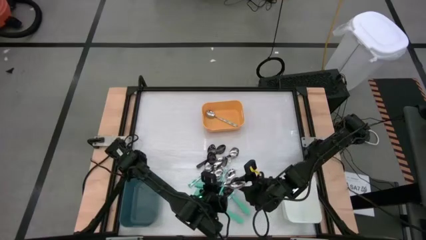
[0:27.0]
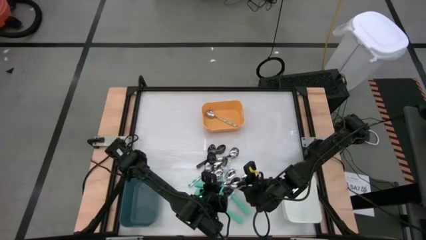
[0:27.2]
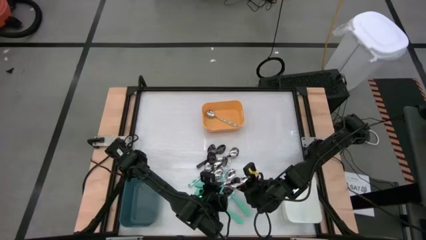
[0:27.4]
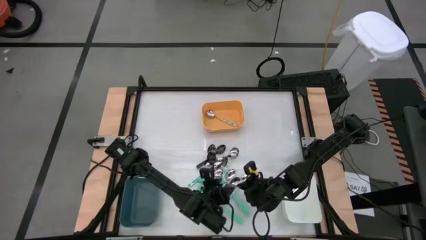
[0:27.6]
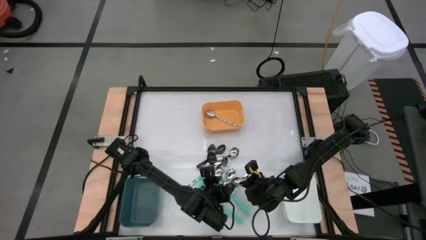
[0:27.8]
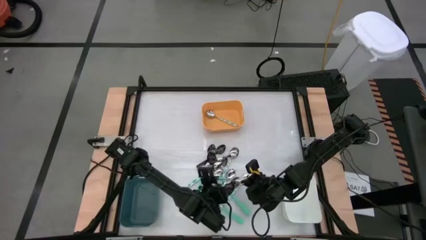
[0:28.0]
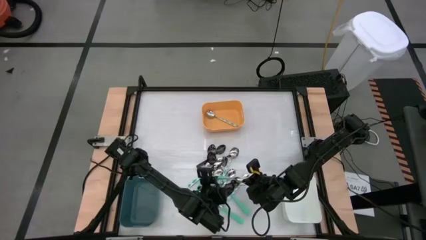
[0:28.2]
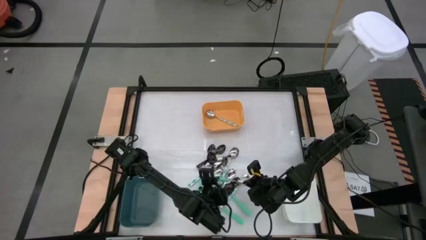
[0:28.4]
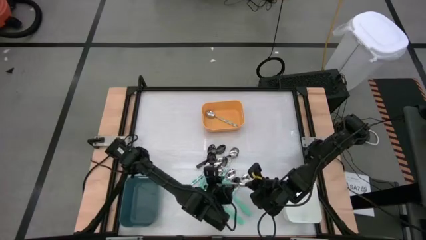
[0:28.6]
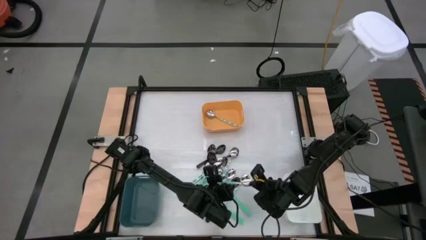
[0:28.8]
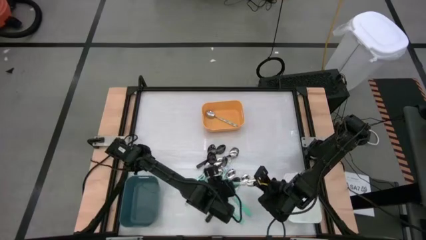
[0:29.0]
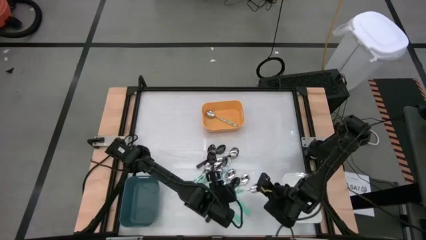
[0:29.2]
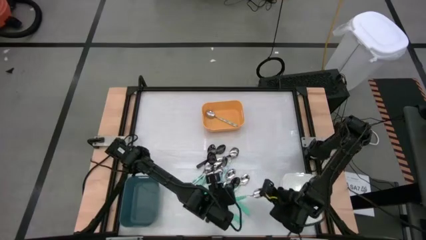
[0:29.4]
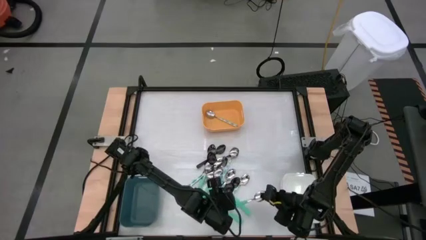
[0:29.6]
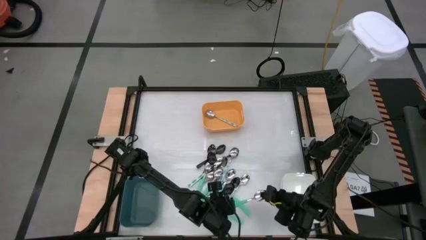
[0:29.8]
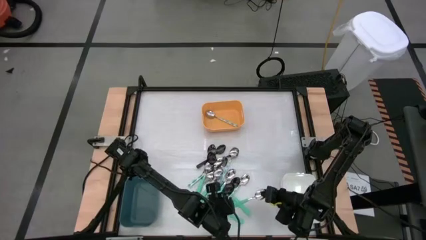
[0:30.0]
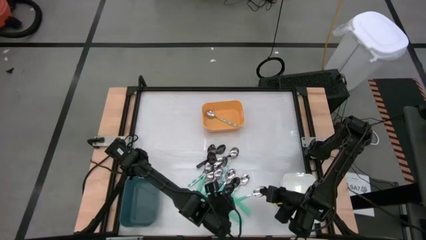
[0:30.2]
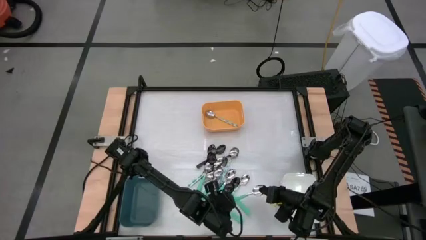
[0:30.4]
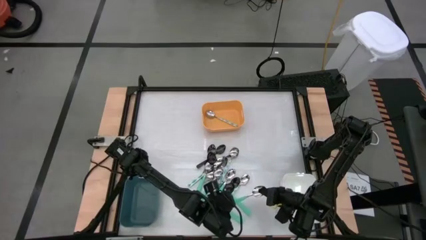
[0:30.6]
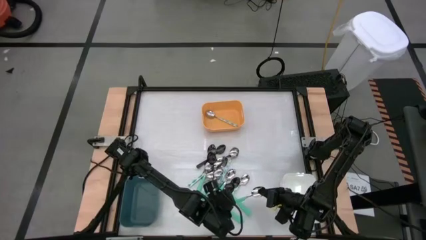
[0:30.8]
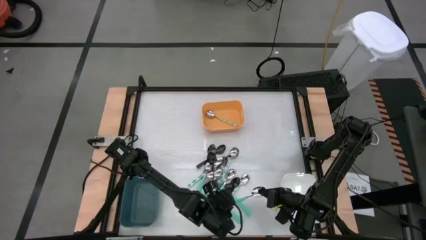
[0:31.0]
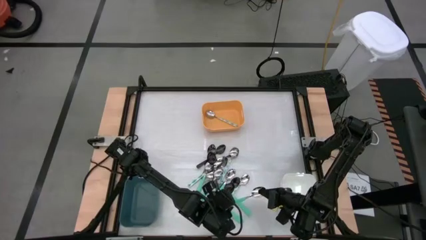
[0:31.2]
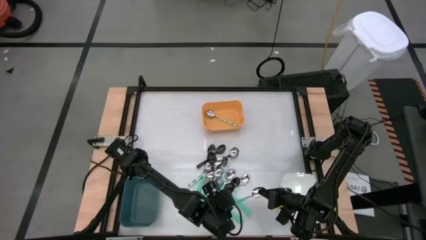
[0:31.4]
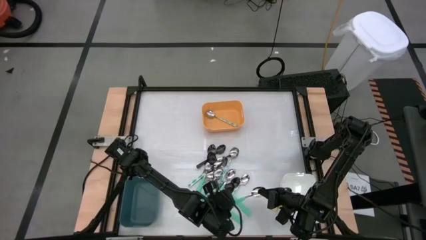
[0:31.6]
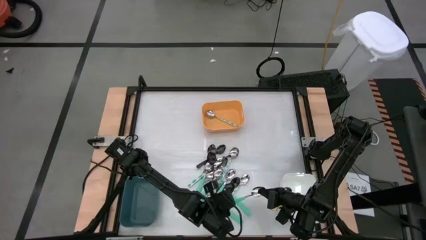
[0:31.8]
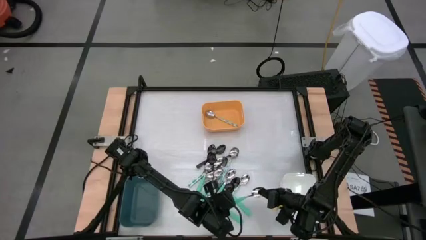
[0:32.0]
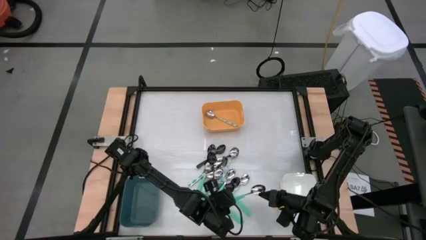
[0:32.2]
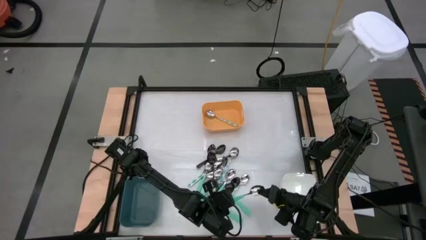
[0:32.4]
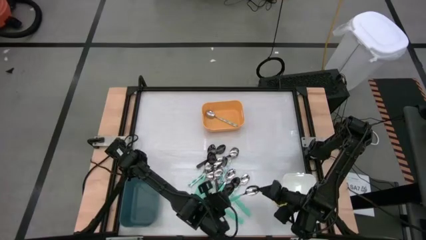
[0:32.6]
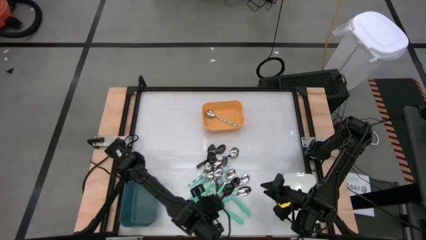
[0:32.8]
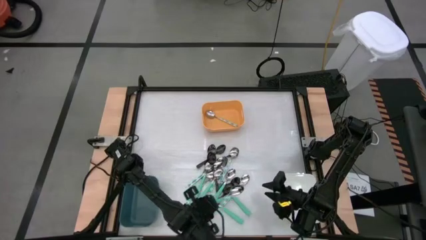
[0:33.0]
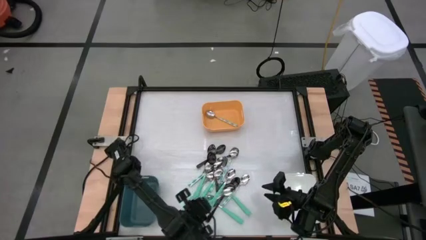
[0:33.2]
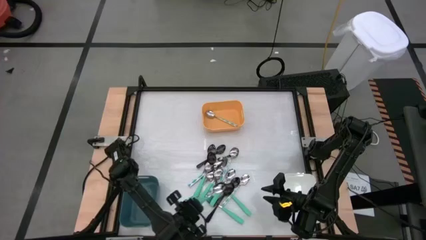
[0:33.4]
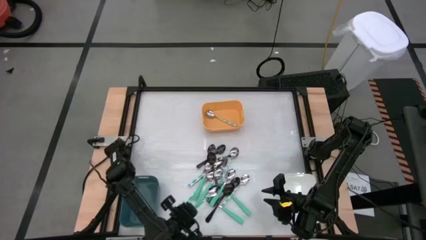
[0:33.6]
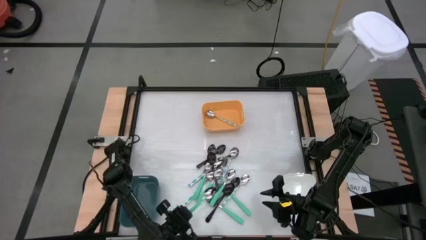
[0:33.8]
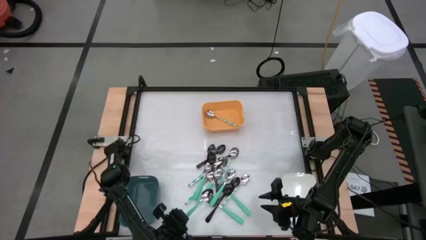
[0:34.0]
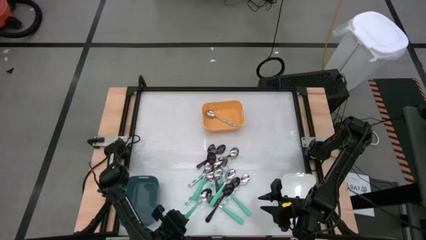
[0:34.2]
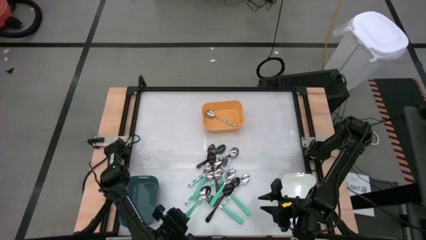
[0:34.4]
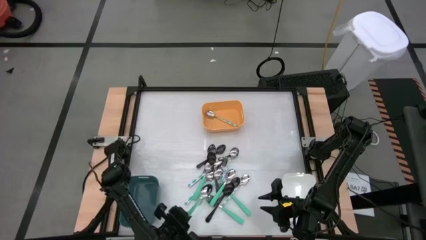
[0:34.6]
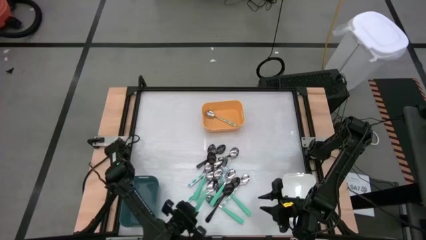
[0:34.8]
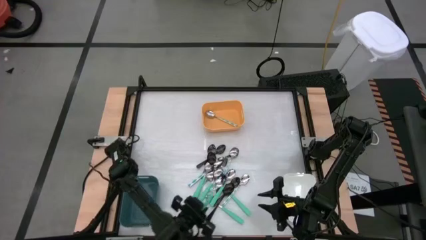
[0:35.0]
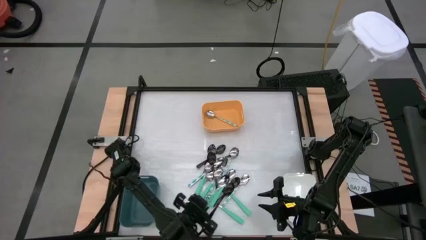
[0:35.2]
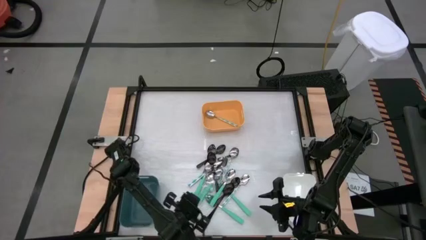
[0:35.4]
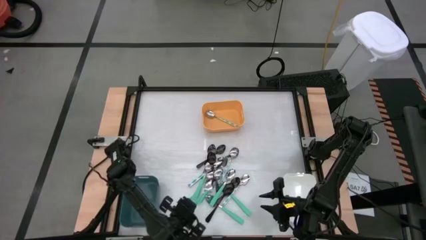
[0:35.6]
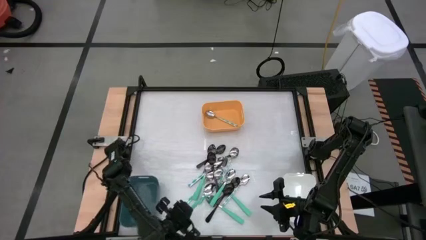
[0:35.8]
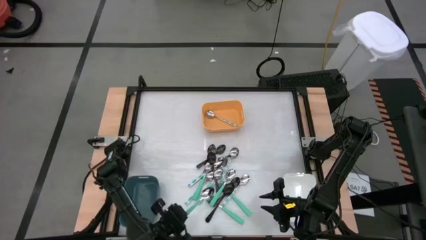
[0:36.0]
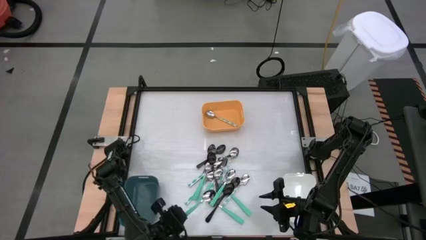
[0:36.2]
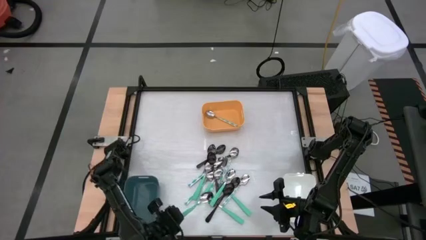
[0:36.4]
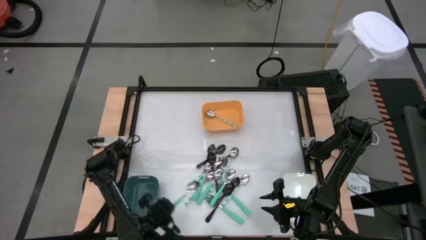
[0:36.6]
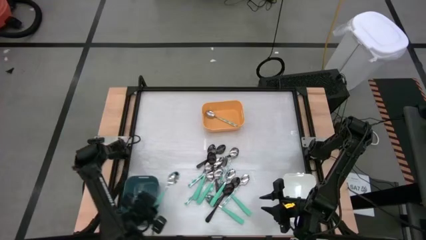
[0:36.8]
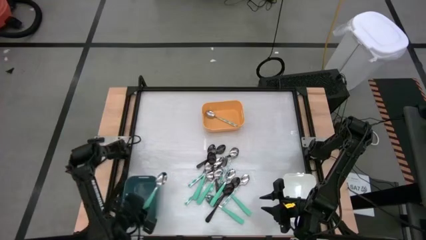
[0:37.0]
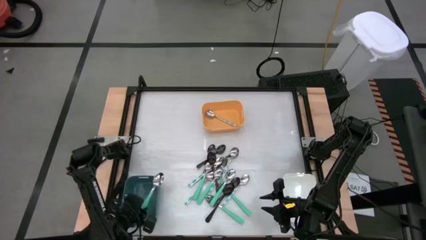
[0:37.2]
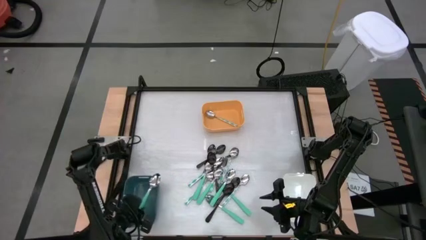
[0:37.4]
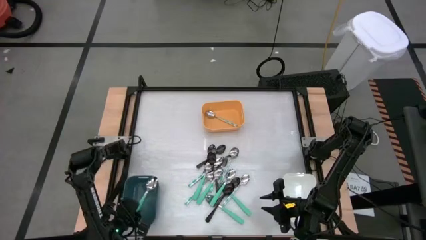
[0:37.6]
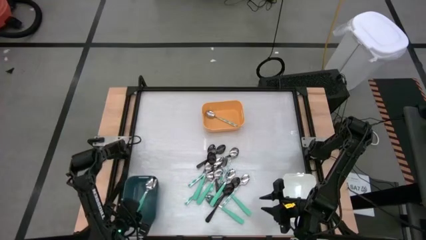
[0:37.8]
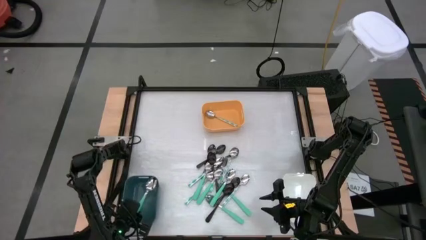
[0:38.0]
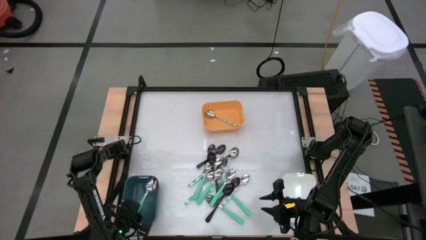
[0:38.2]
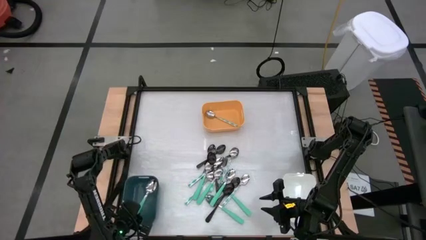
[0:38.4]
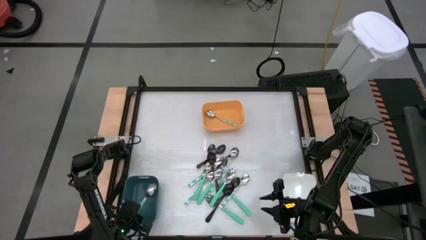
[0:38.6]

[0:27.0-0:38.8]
Task: Sort silverware by color (type)
Put the green spoon into the blue bin
